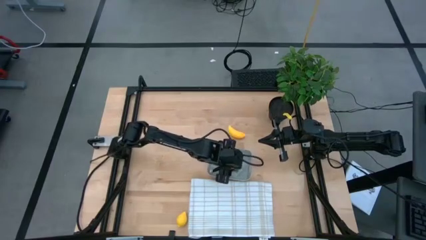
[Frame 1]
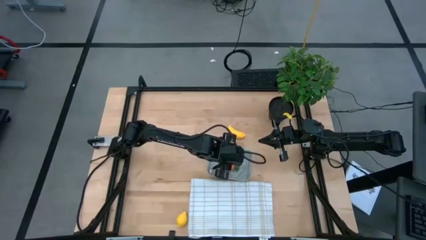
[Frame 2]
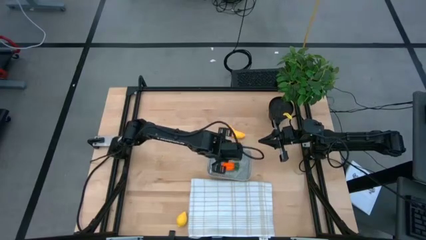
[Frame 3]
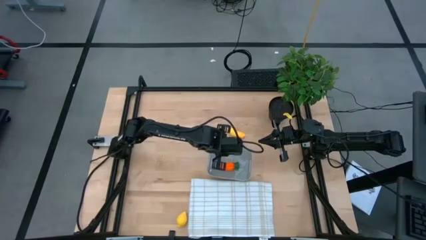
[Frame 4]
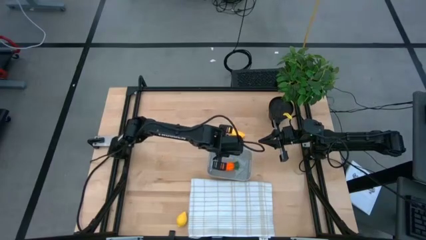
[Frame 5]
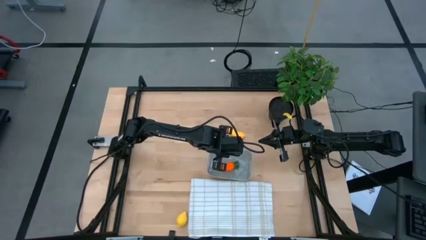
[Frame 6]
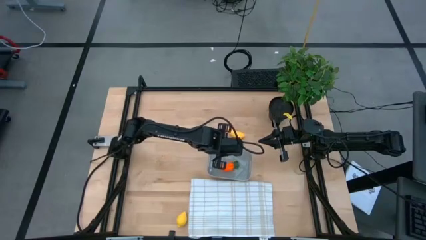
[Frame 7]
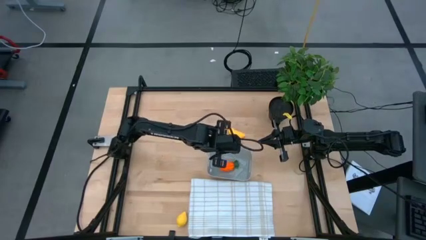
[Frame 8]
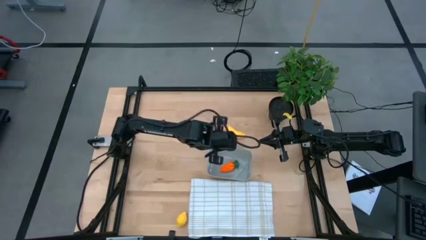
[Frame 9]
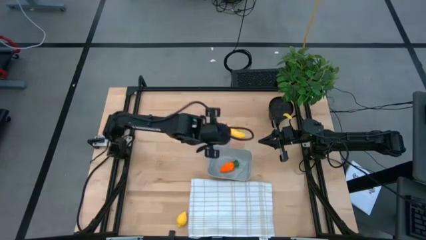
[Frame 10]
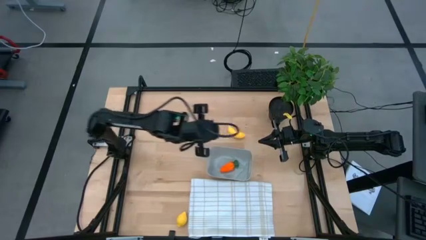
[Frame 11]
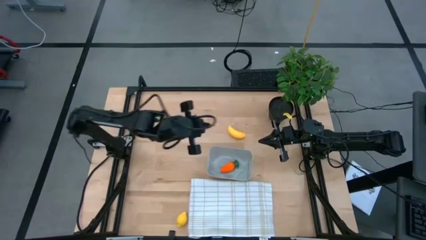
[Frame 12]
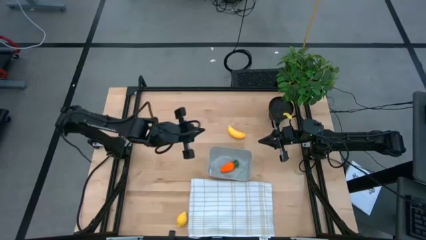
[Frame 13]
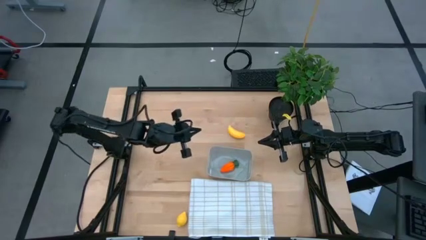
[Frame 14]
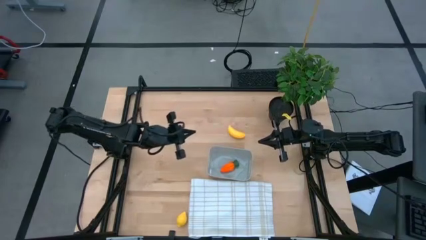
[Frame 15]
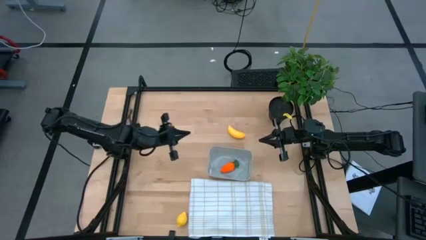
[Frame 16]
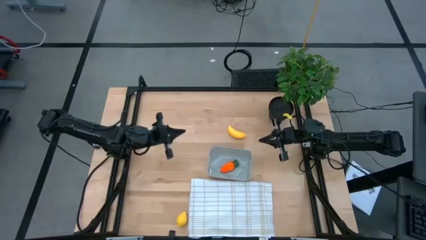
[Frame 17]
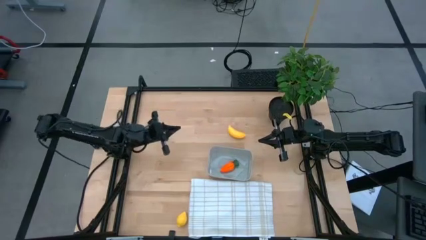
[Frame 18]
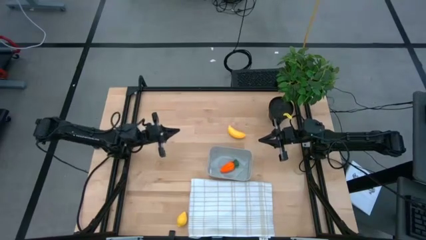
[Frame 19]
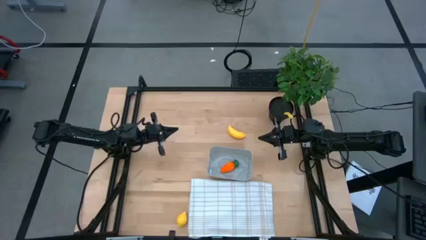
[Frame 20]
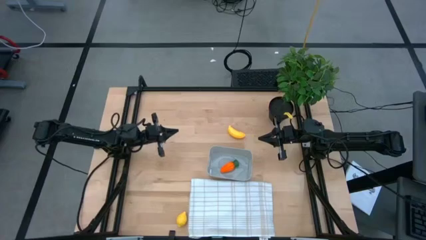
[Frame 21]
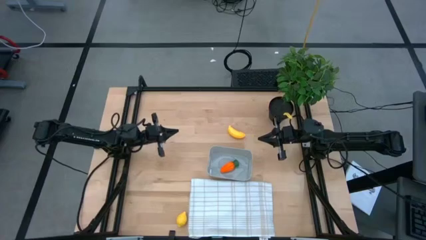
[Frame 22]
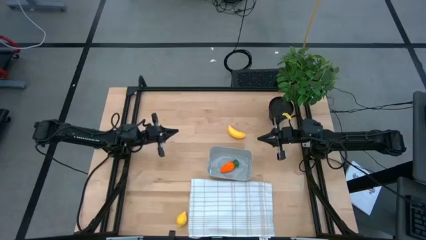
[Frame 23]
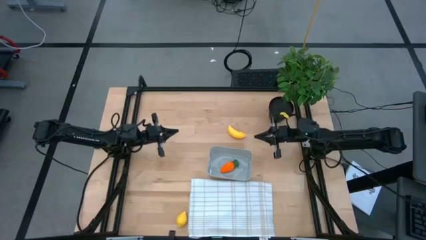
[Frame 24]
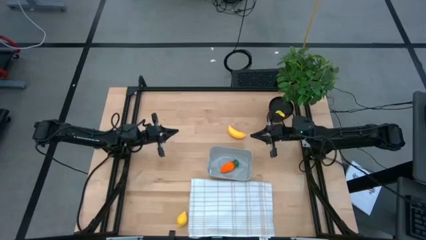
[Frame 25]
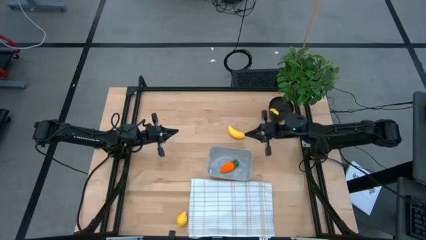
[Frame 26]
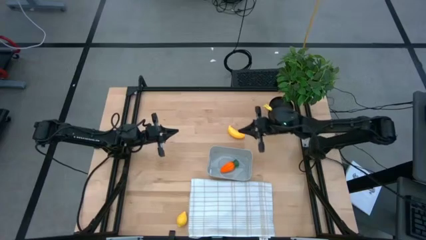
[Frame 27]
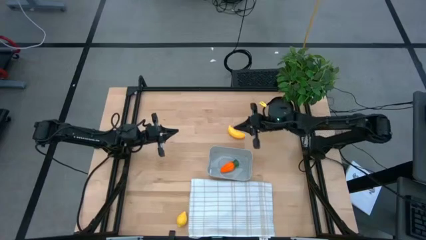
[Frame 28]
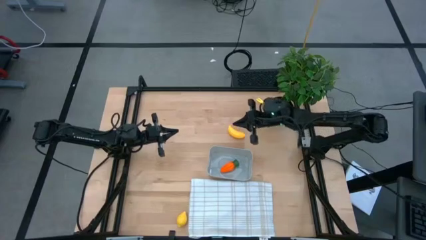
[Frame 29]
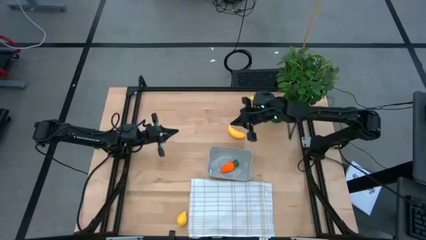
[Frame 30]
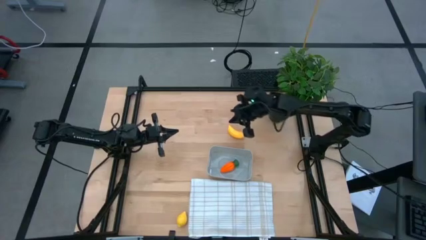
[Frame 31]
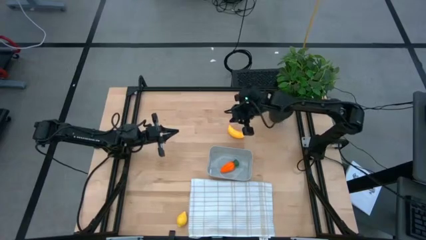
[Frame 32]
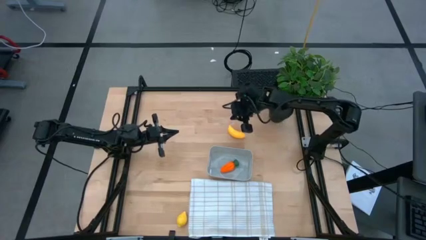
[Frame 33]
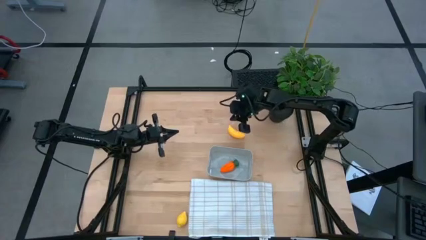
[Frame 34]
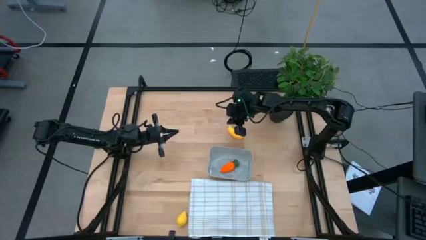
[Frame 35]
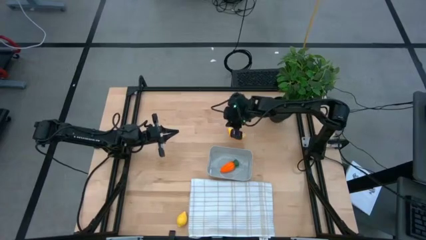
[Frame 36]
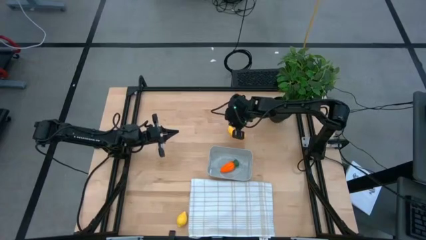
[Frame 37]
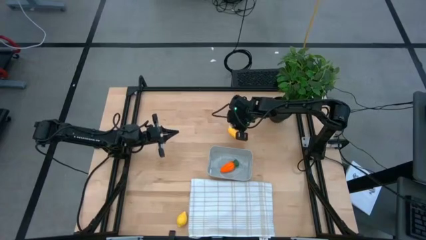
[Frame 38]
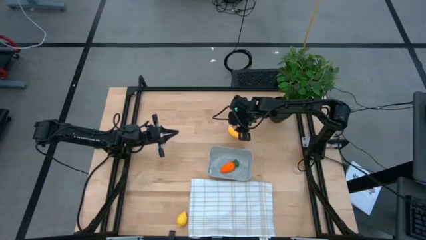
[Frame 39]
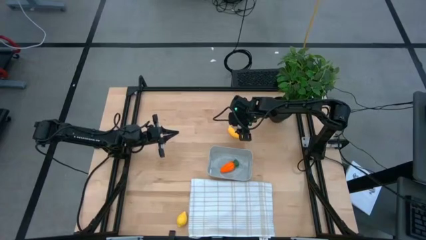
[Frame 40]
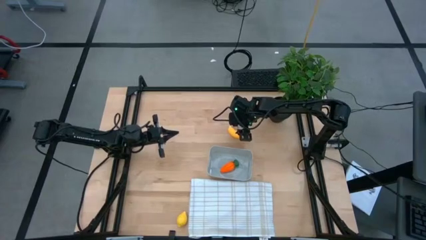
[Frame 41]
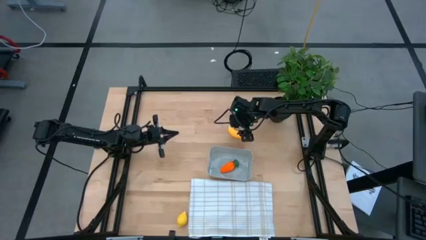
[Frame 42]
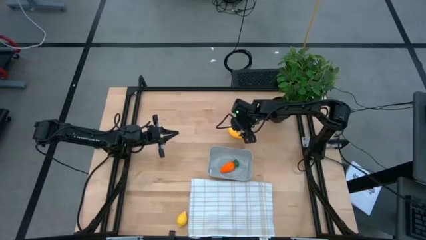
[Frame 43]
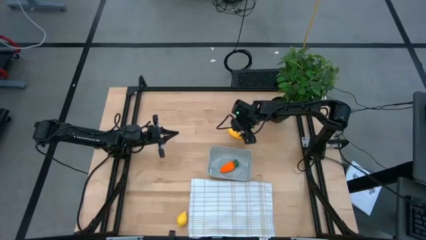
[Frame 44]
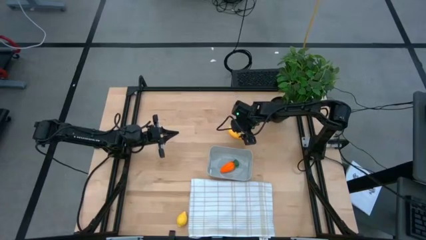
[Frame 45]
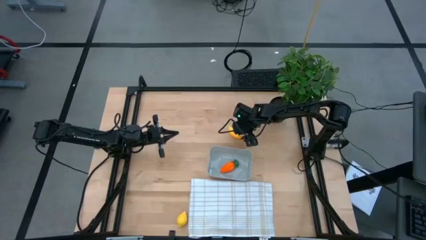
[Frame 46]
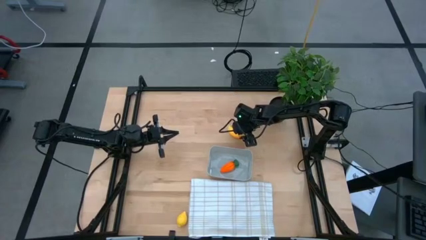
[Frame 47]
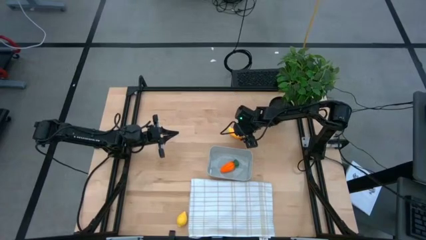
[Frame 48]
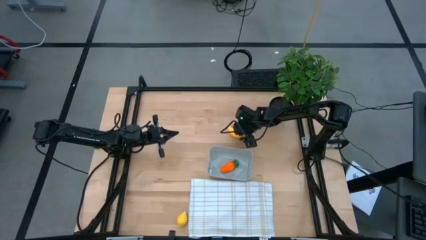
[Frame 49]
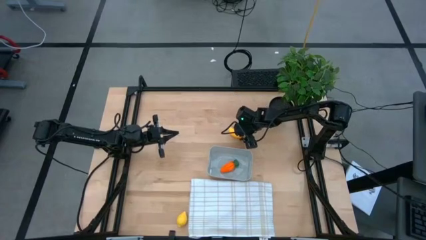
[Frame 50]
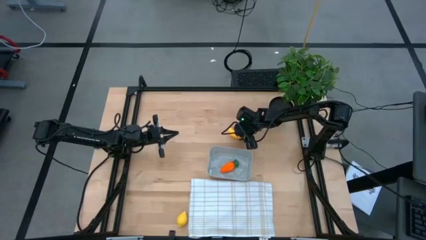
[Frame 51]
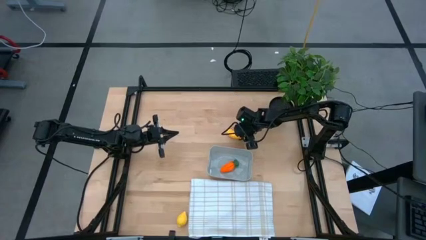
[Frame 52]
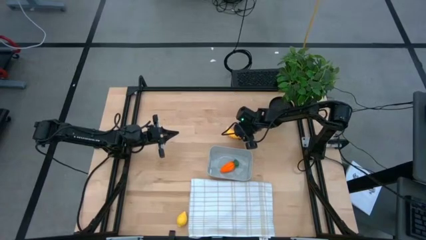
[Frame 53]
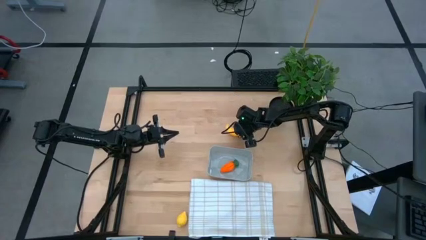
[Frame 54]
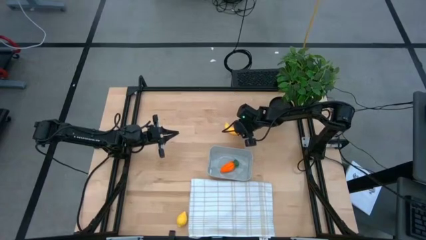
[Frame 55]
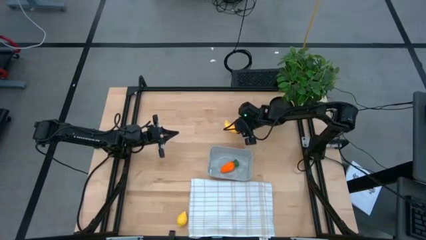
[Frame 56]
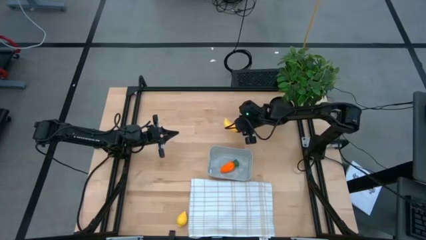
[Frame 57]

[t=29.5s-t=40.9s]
Task: Pick and placing Produce into tupperware
Put the yellow banana into the gray bin
